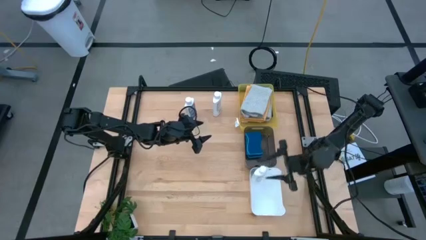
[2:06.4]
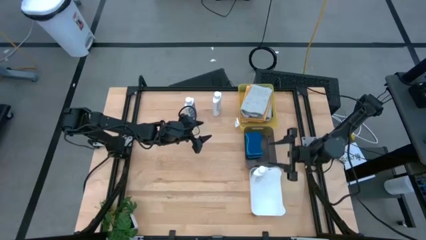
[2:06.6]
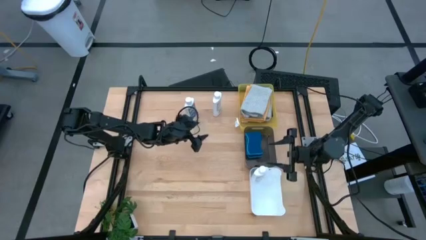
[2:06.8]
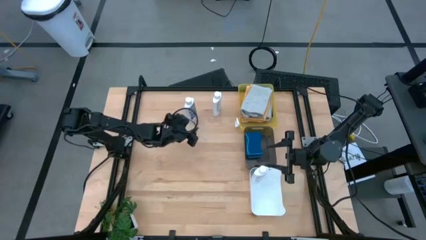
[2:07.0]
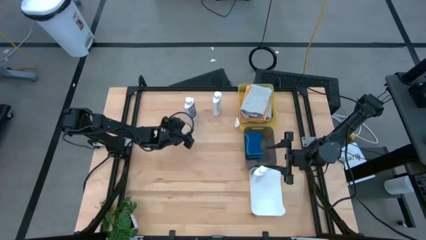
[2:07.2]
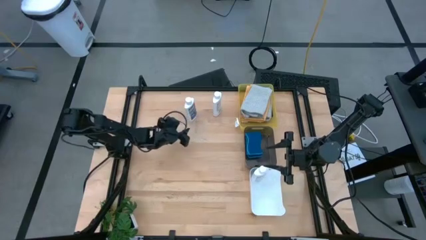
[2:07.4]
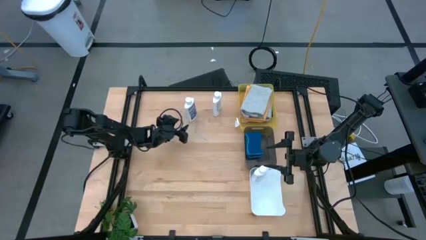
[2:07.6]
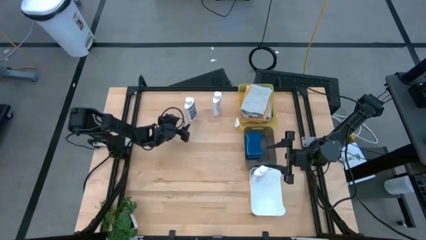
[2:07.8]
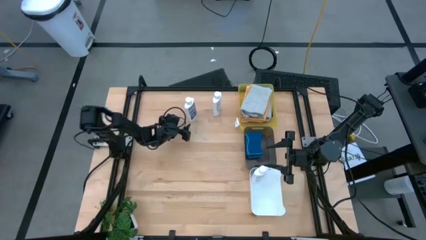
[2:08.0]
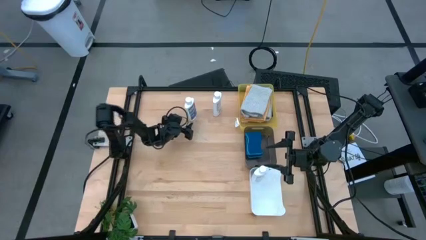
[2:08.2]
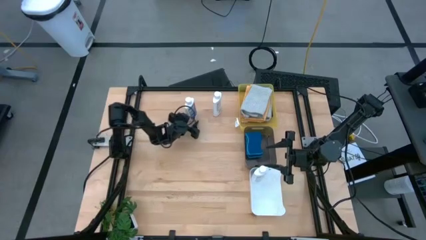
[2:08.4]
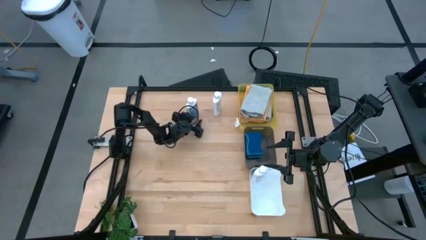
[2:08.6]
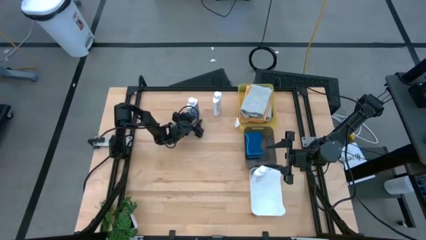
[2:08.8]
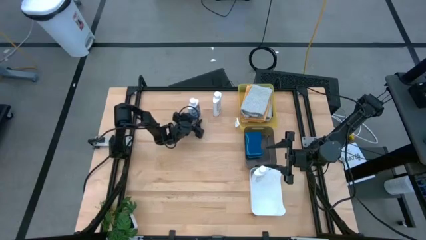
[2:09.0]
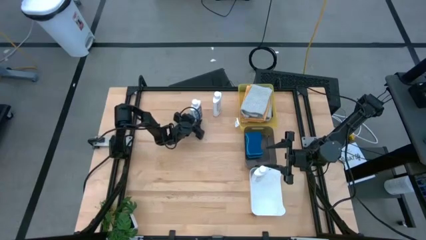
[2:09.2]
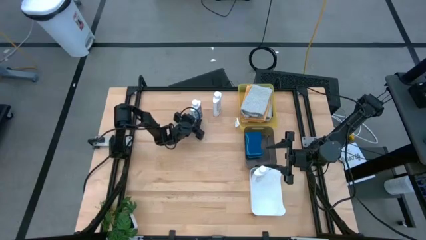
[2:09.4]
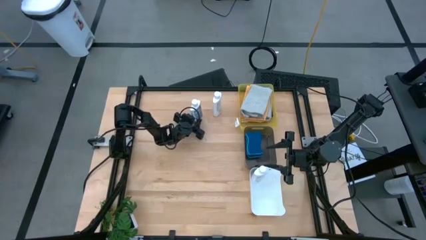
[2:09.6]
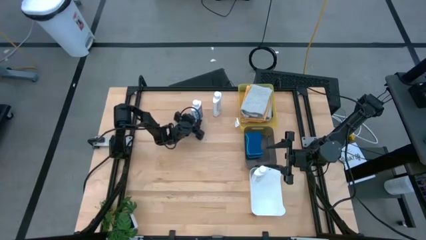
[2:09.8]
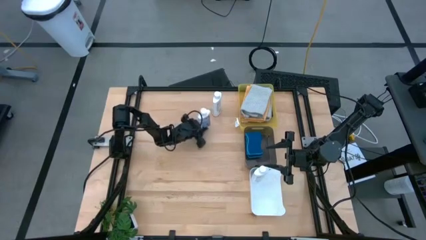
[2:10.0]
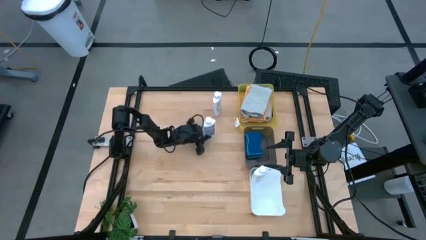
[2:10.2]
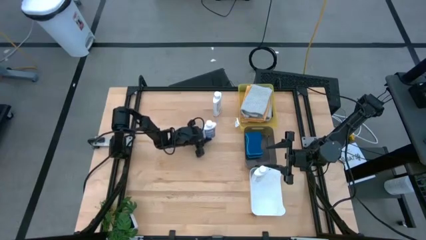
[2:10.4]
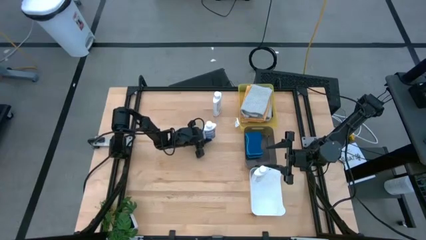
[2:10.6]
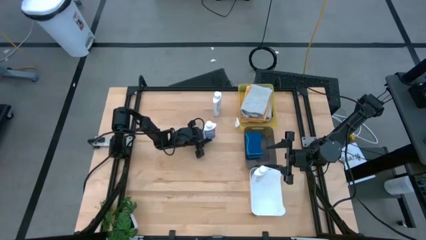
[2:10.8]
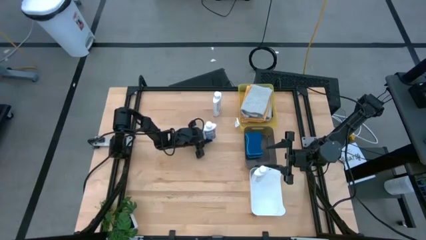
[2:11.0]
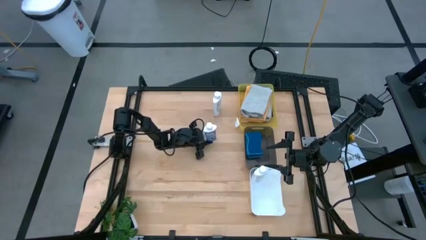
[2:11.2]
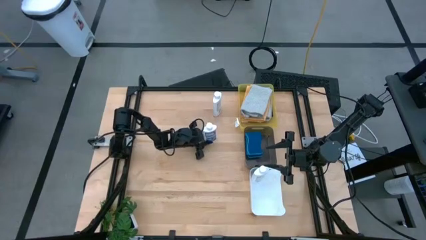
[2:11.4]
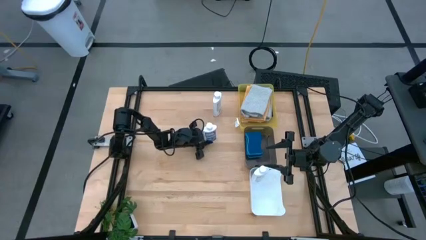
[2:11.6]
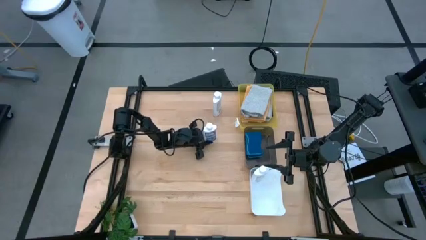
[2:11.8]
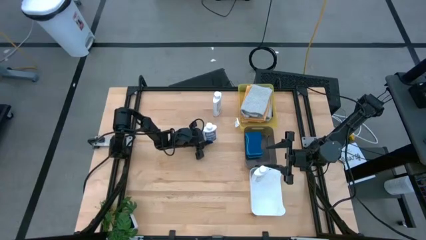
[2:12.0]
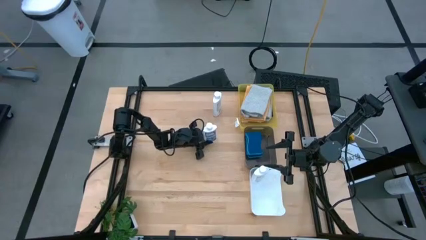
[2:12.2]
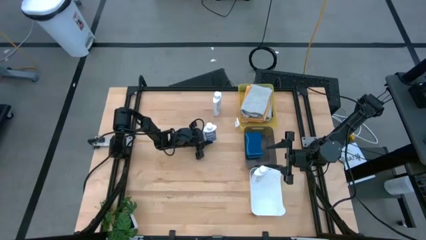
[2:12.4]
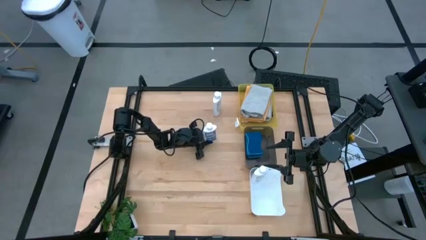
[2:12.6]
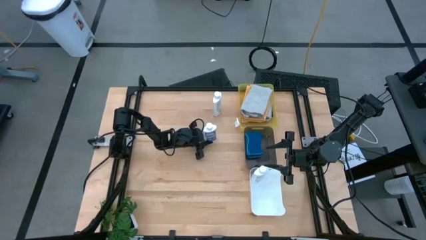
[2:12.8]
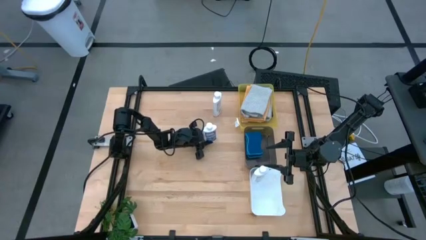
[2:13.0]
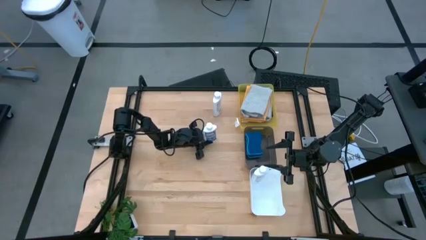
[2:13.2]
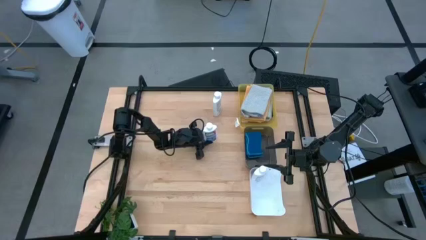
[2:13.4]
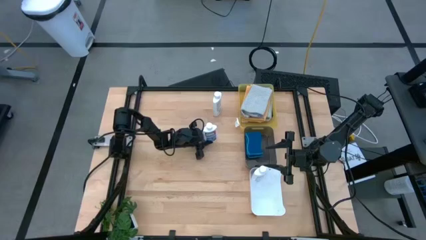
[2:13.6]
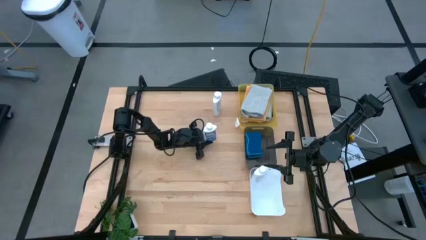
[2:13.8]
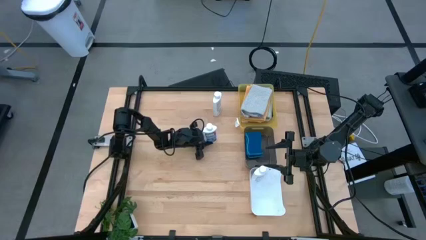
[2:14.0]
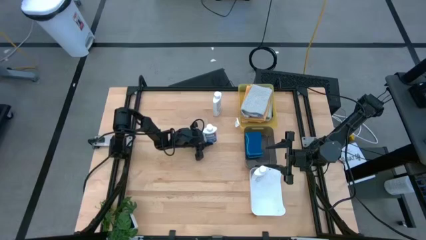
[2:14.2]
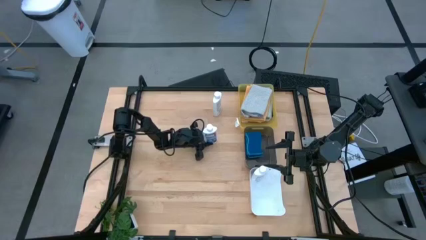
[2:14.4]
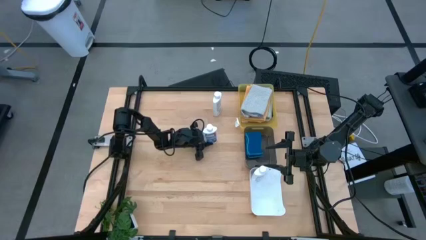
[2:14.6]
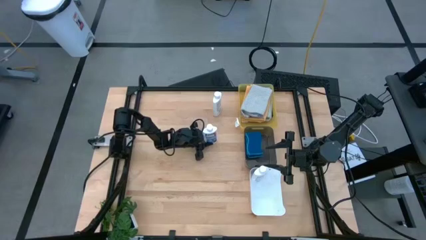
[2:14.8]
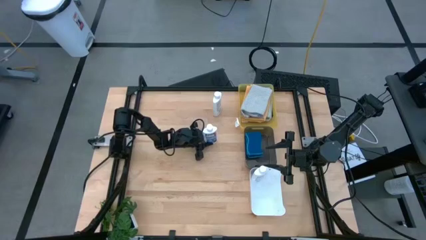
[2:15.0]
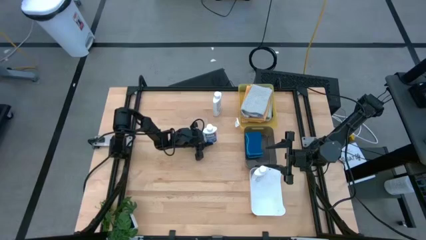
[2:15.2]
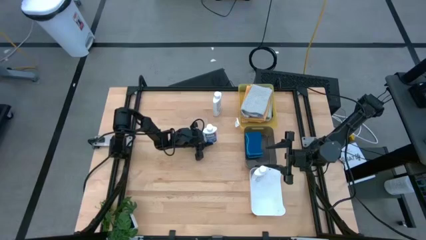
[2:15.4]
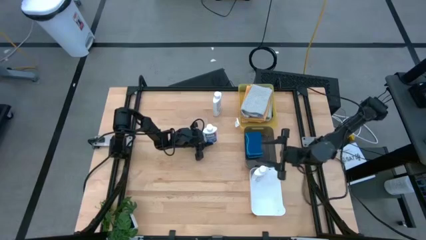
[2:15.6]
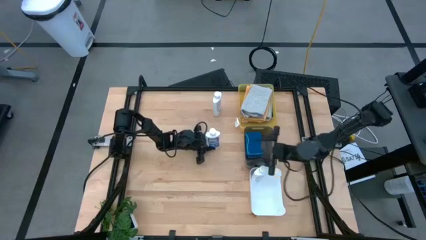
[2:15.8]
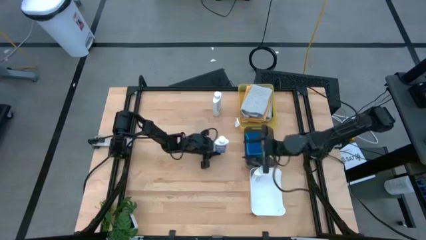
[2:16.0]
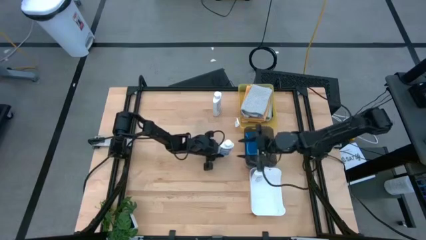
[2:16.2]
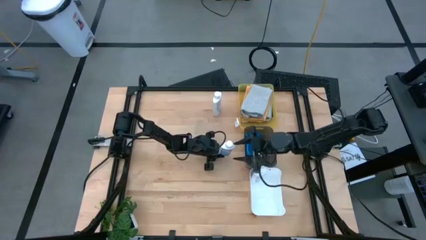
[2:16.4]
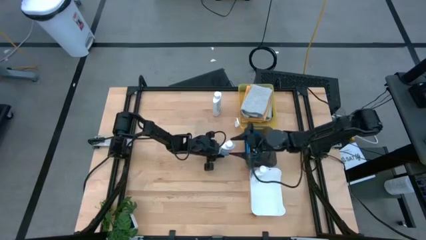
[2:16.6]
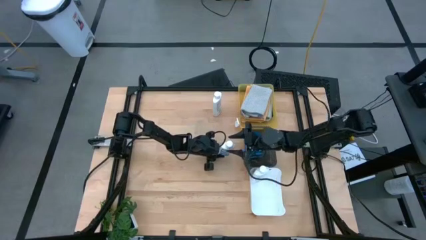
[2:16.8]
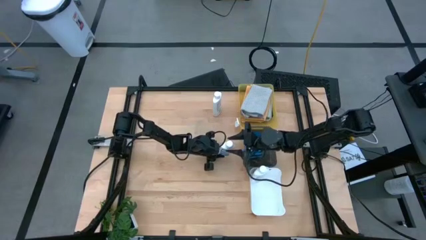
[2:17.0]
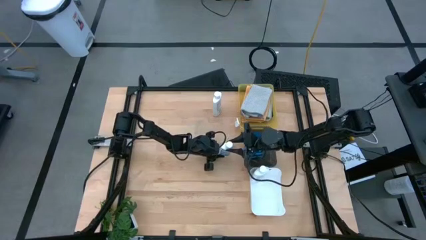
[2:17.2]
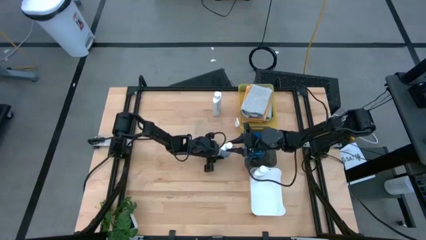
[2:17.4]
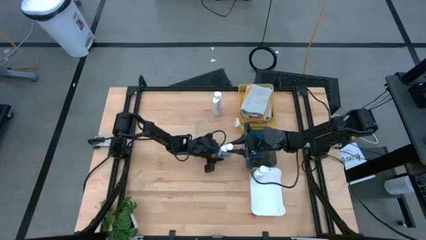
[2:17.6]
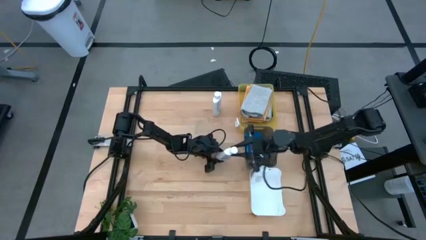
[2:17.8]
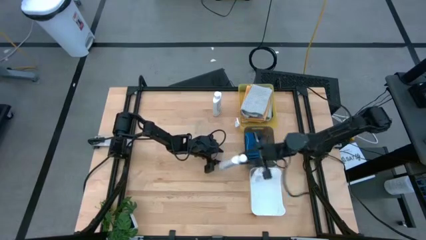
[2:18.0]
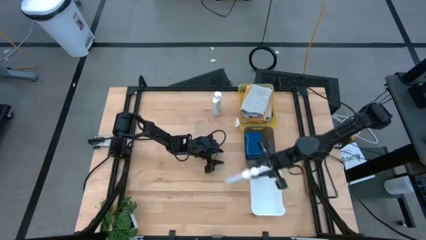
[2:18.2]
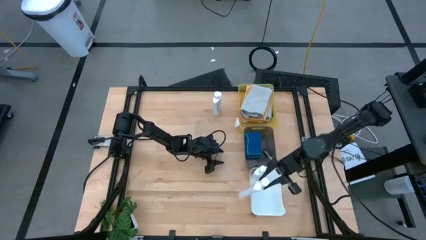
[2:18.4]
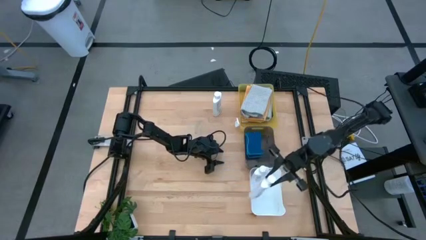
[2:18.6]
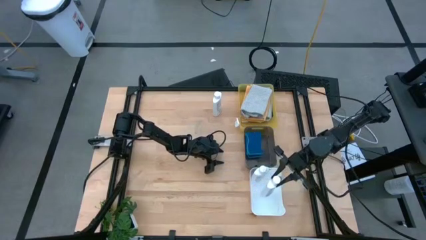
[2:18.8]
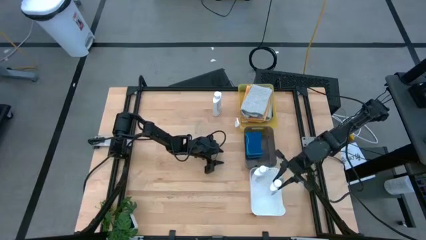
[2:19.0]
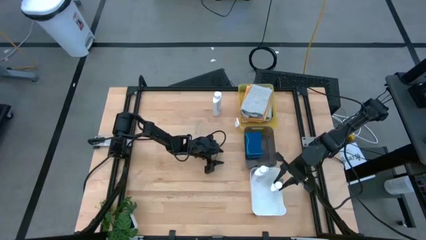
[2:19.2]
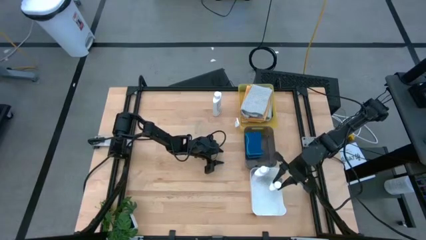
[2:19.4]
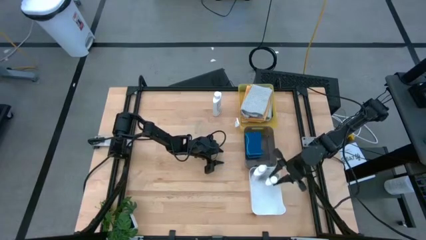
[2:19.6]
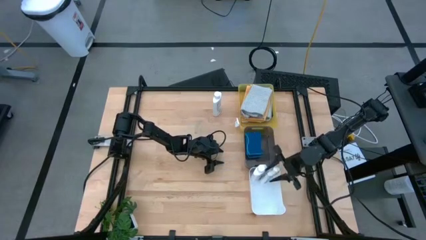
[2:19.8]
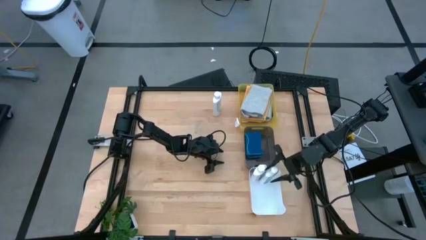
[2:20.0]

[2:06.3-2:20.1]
Task: Pick & Place Kitchen Items
Put the left white plastic restorer bottle into the white bin
